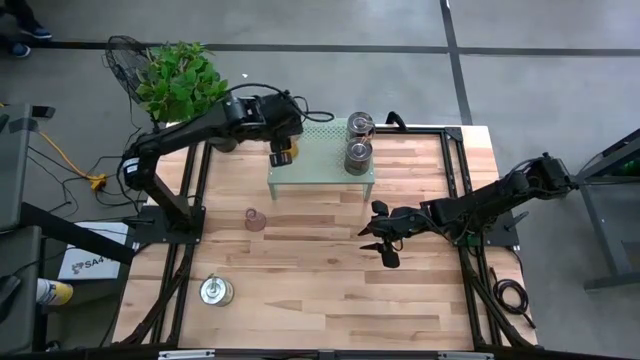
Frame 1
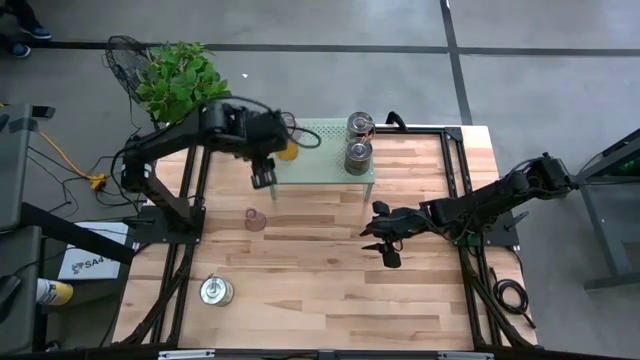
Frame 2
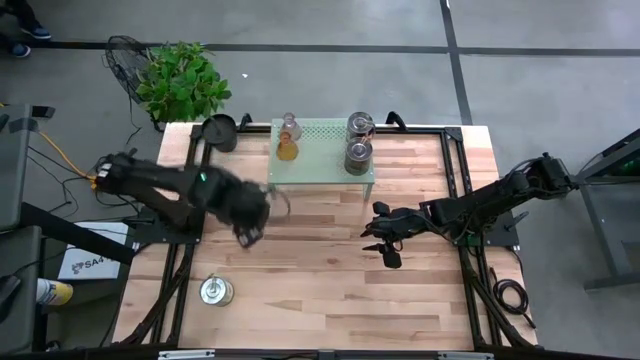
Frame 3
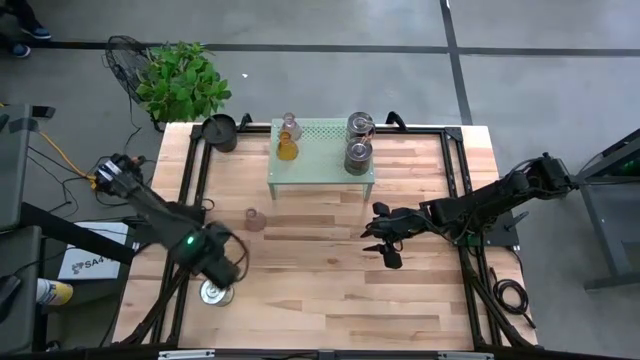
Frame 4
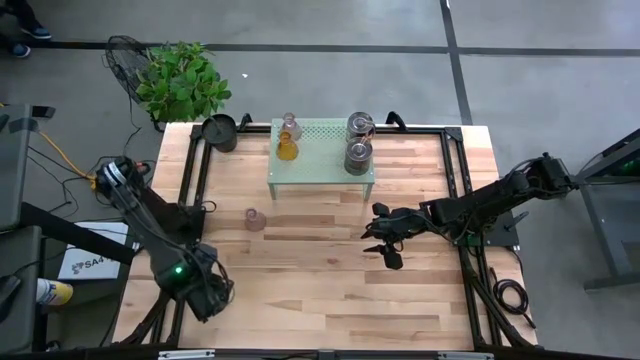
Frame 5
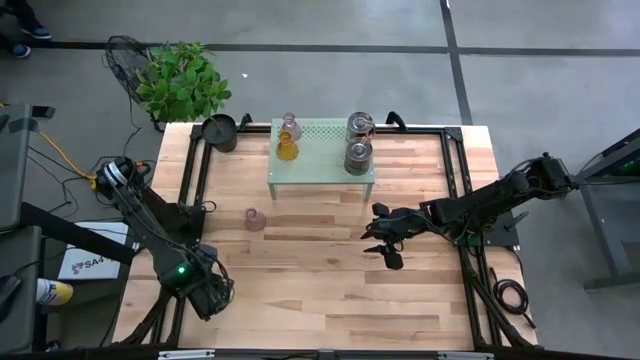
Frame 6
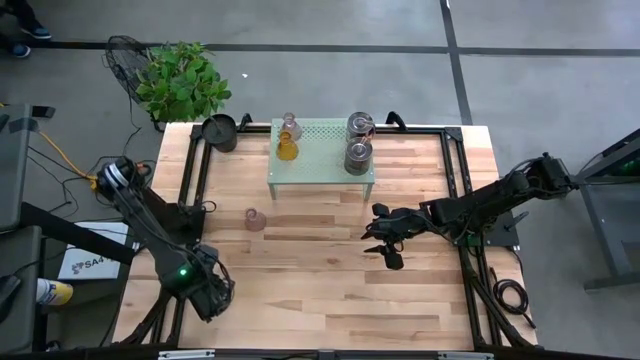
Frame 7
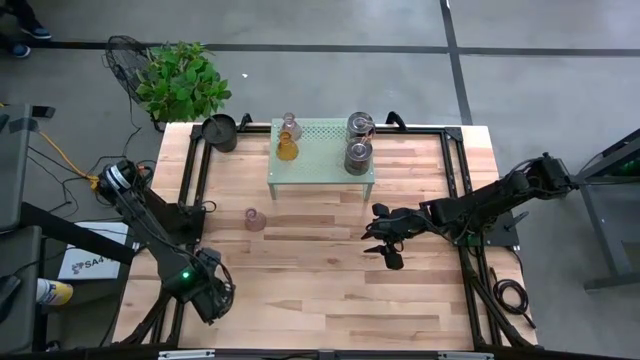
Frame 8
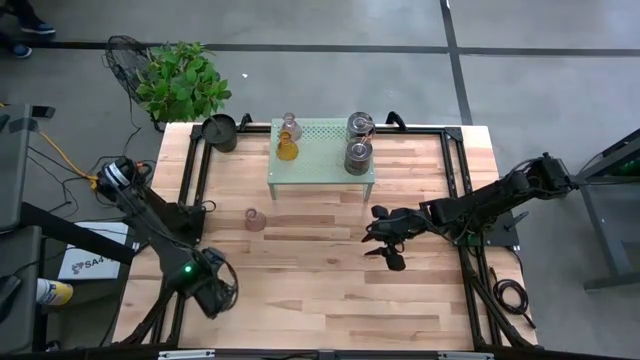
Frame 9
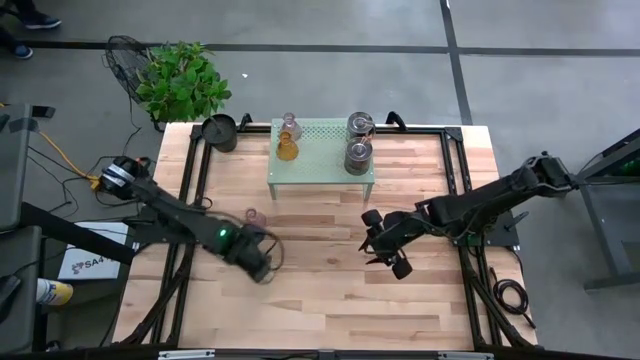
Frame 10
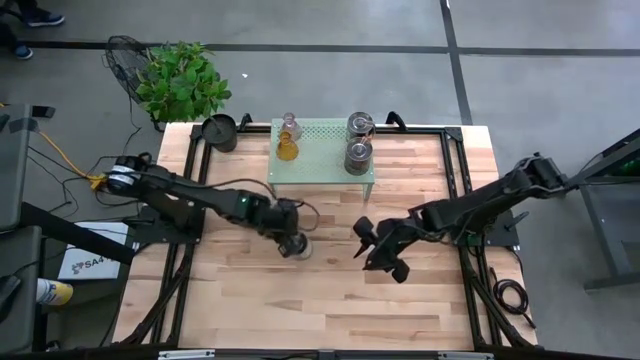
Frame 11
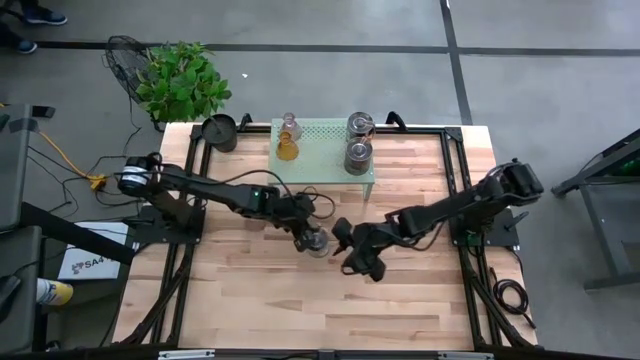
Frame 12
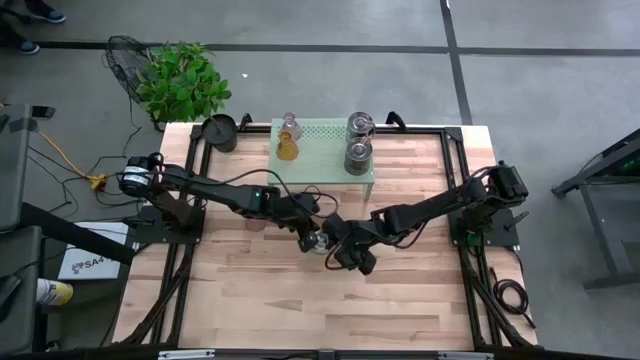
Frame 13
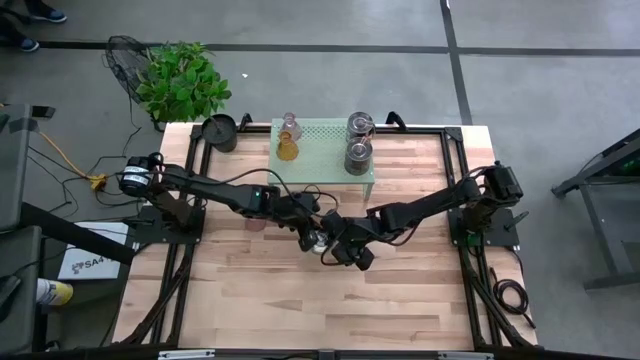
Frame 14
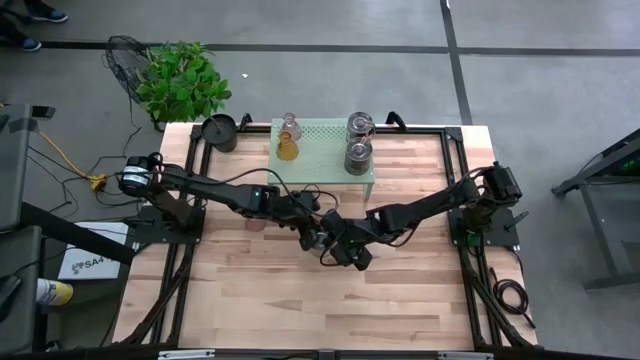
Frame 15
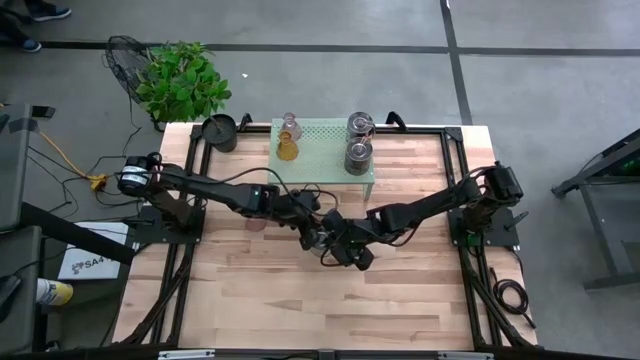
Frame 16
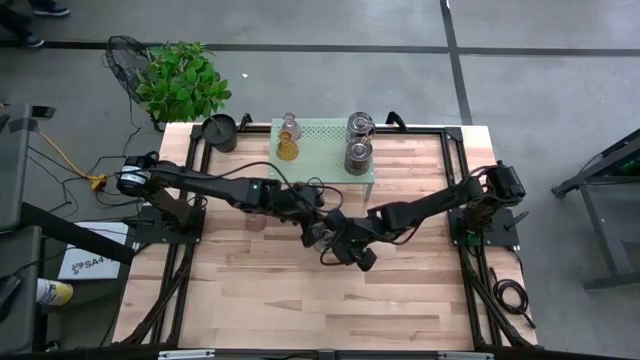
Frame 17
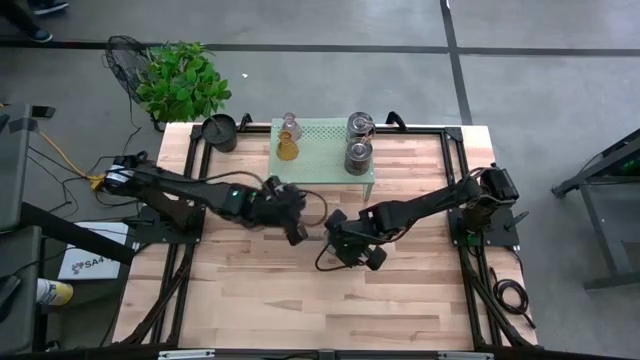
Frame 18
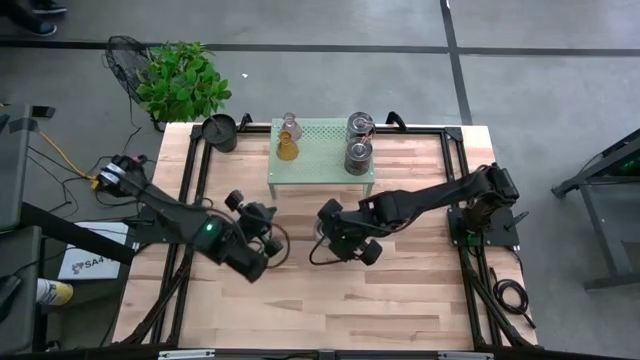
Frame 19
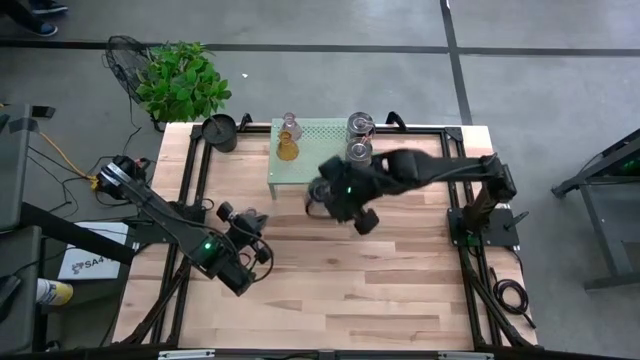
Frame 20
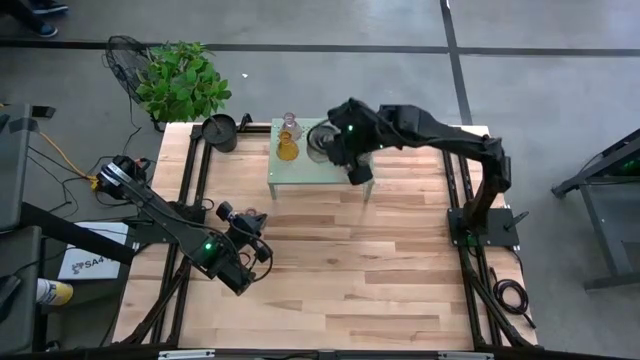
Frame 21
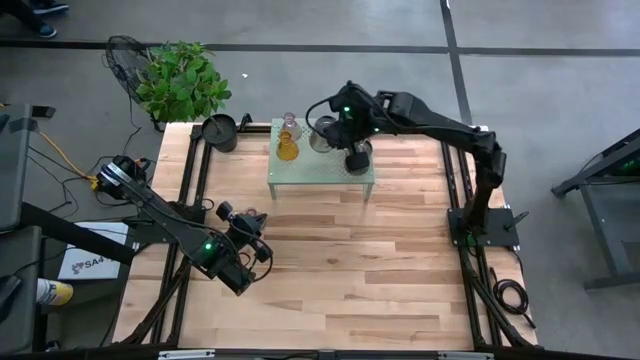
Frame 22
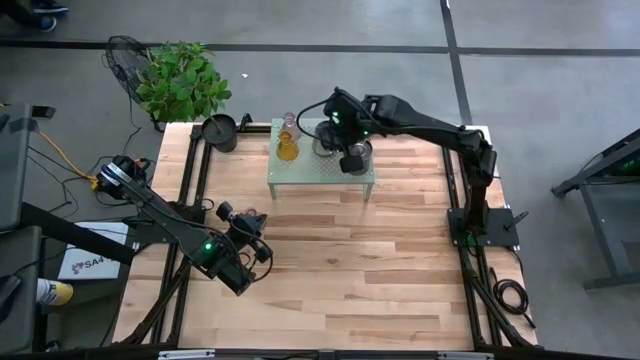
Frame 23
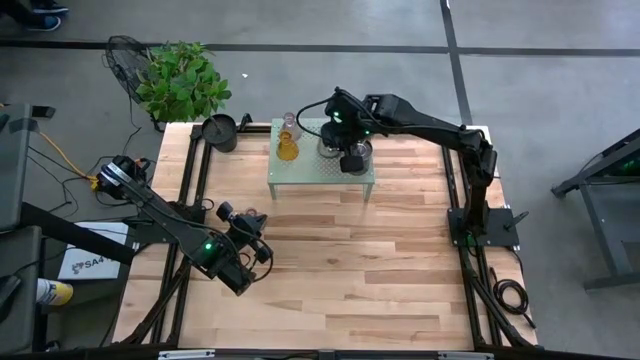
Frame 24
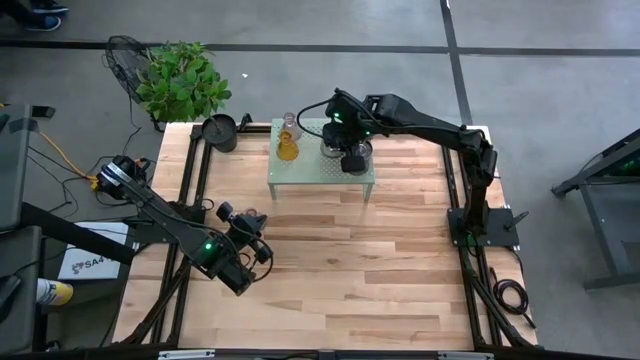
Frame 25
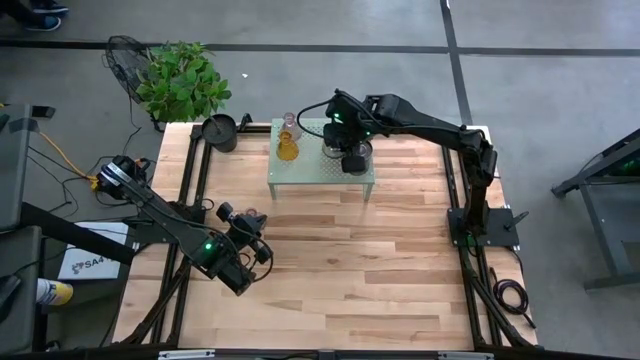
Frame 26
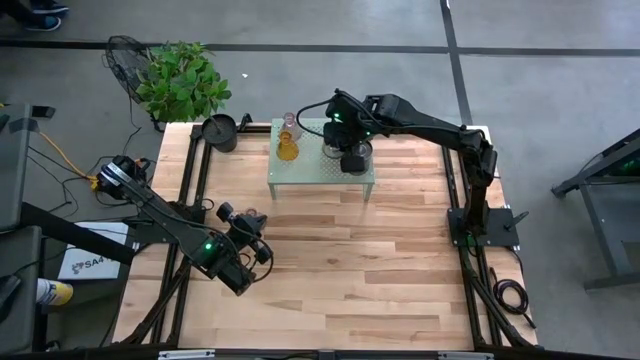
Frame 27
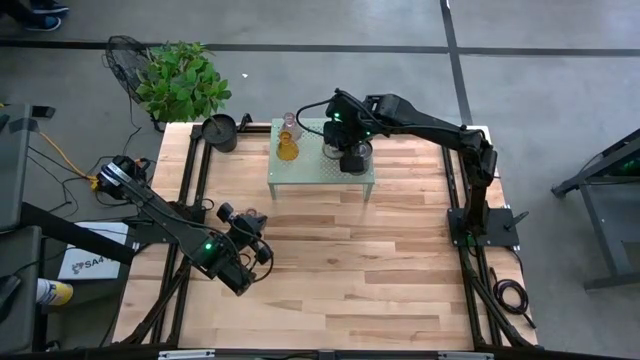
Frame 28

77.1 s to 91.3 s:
Task: Pick & Place candle stick holders
Put the scented candle on the shelf

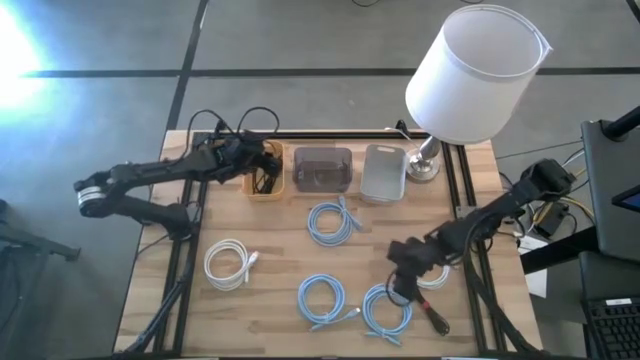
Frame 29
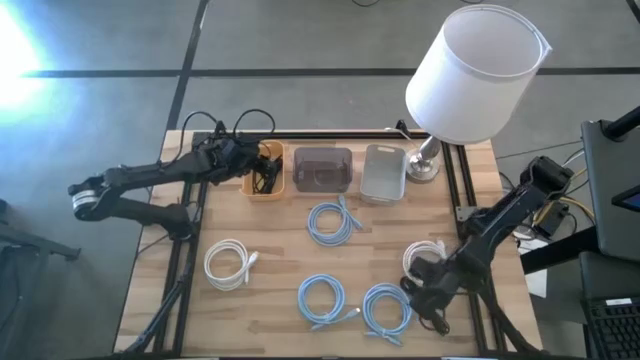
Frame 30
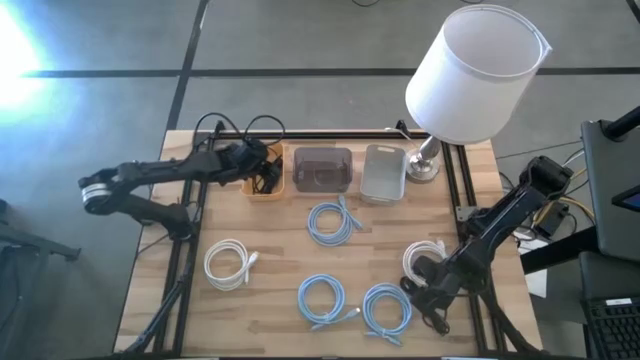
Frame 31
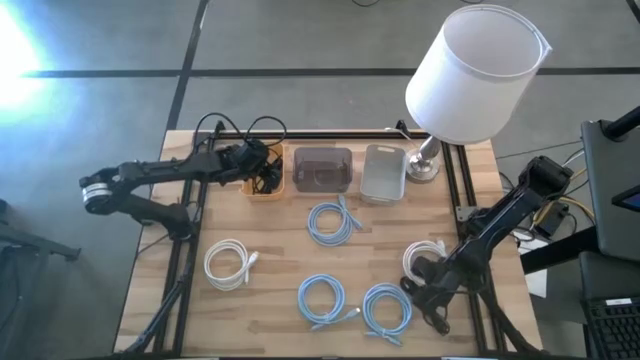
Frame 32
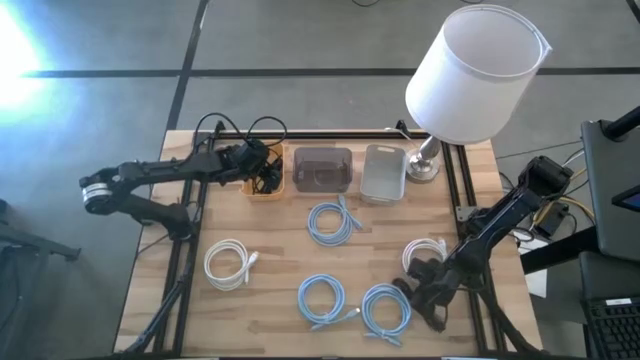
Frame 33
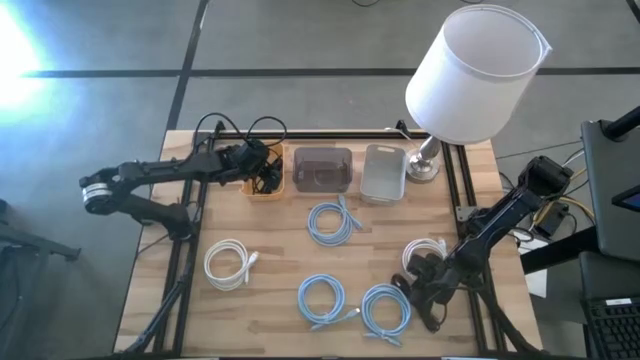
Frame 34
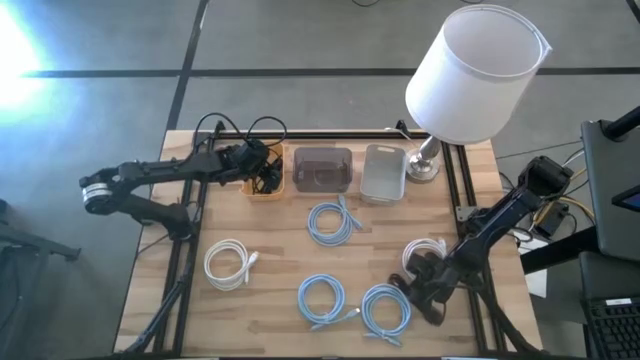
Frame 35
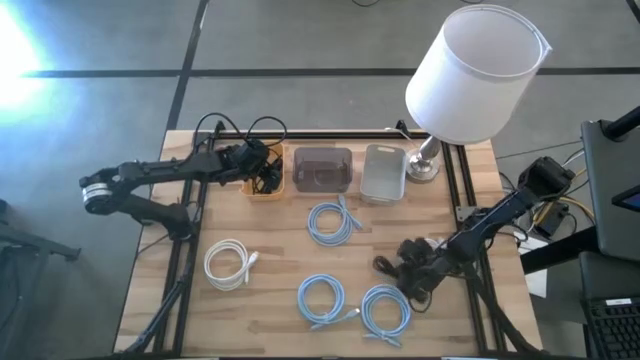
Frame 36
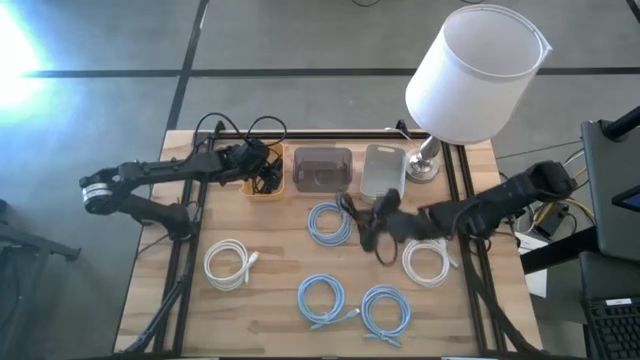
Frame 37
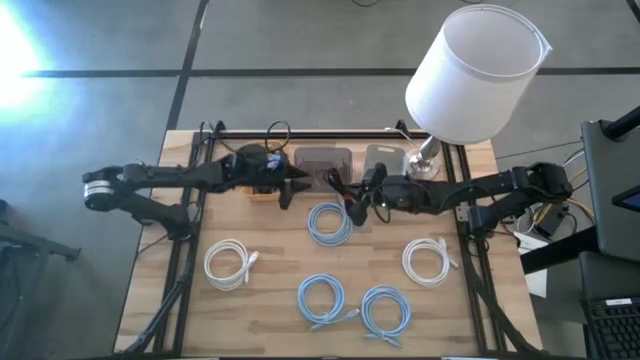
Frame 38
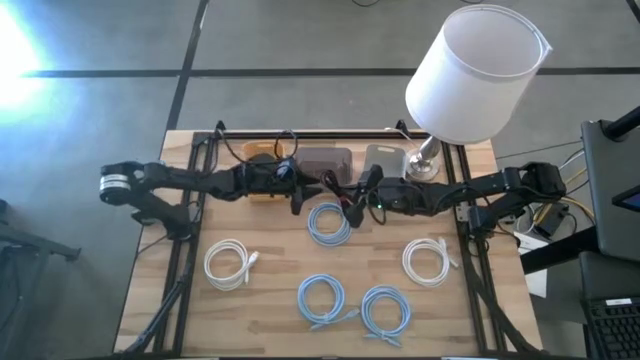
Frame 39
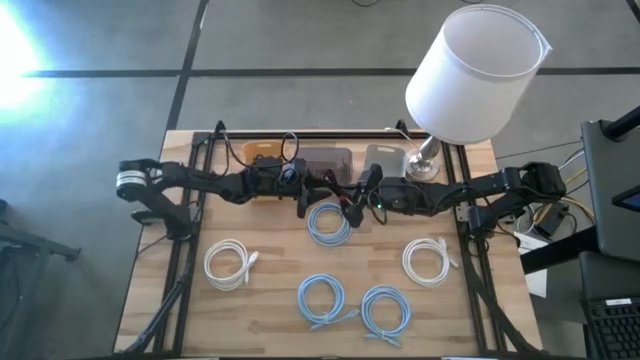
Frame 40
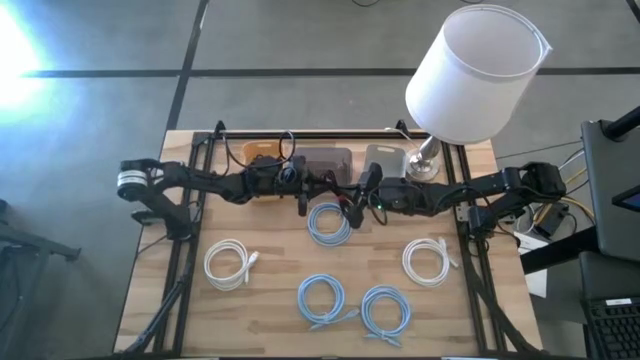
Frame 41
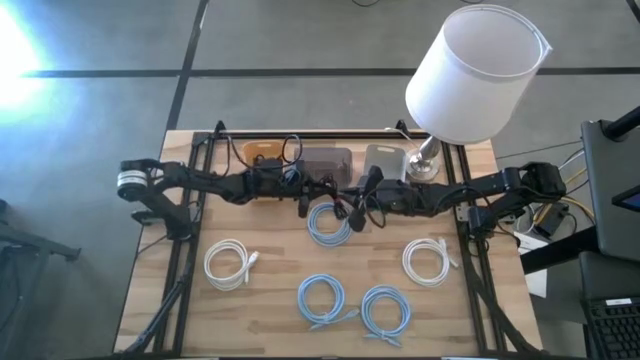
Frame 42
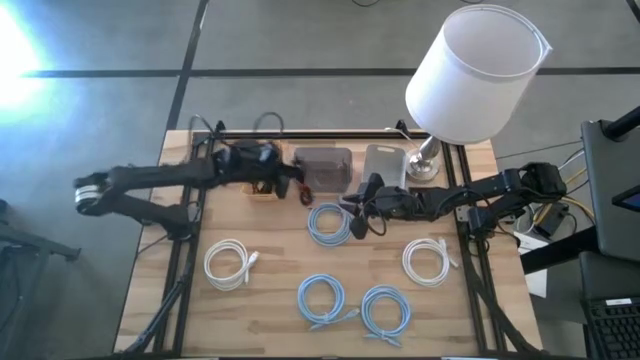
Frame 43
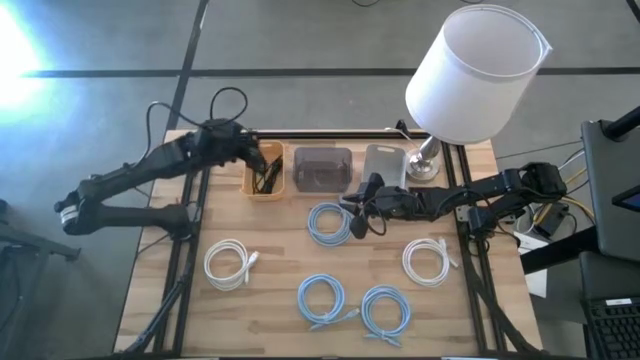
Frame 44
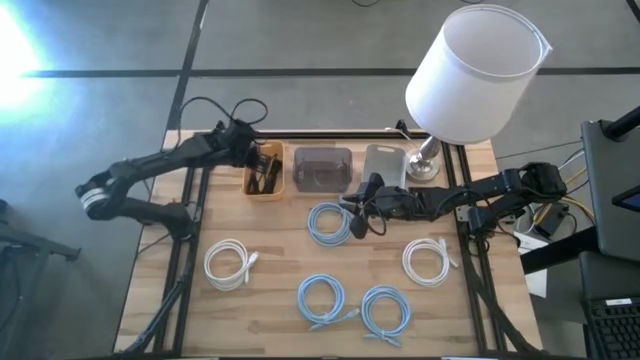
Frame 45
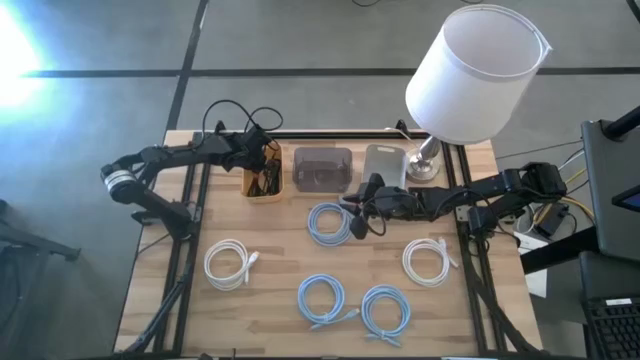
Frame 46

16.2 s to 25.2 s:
Task: Pick & Place USB Port
Put the black charger cable into the orange bin
